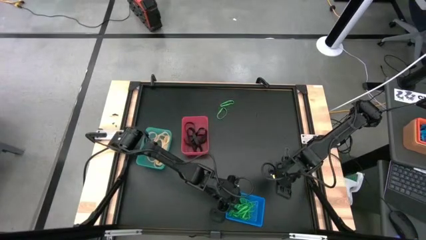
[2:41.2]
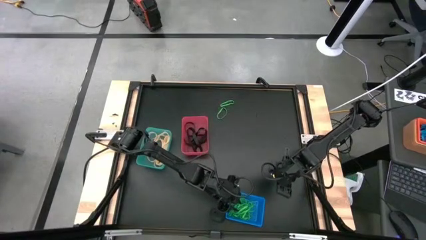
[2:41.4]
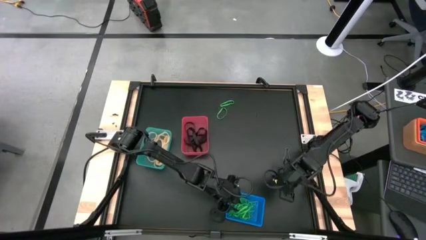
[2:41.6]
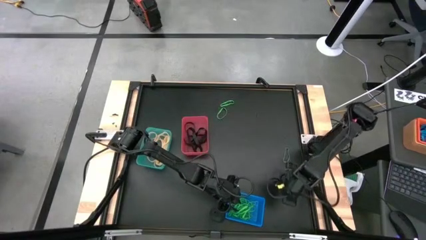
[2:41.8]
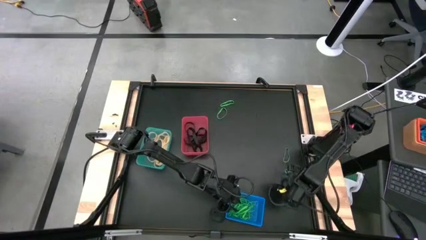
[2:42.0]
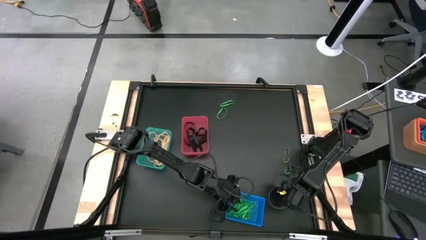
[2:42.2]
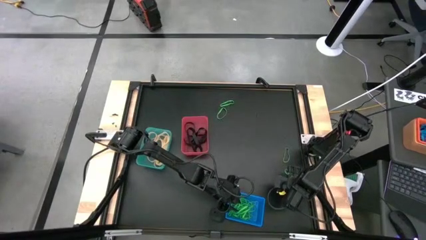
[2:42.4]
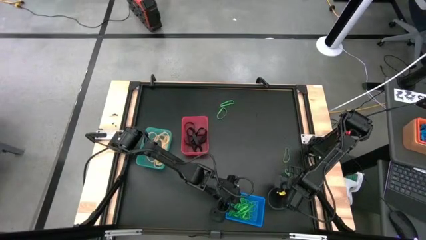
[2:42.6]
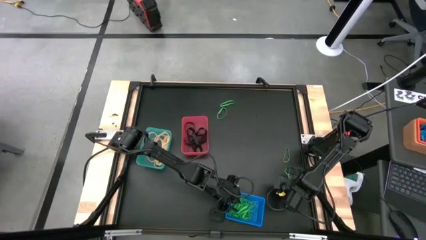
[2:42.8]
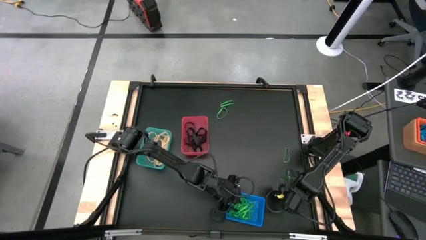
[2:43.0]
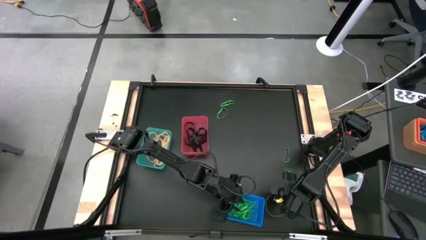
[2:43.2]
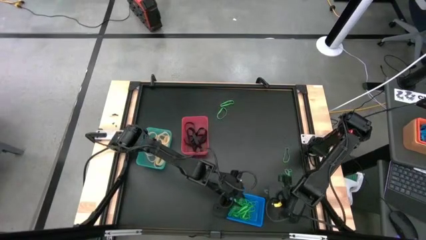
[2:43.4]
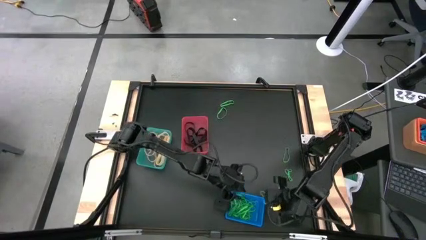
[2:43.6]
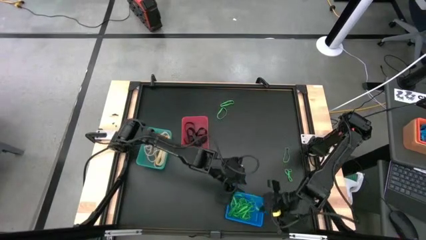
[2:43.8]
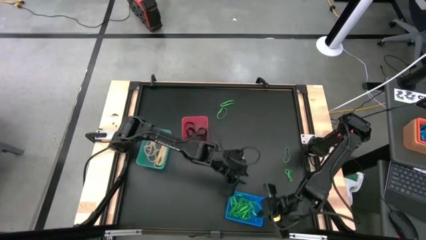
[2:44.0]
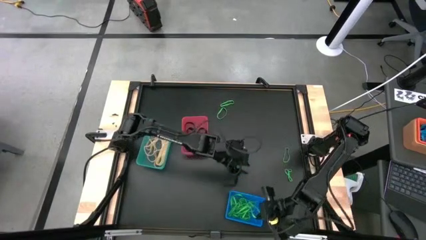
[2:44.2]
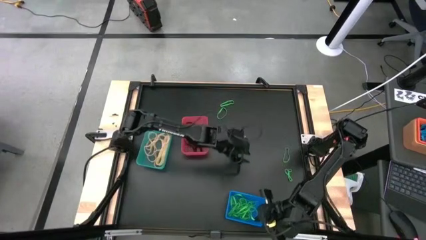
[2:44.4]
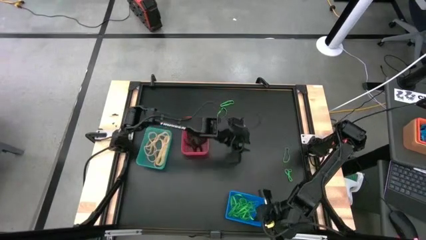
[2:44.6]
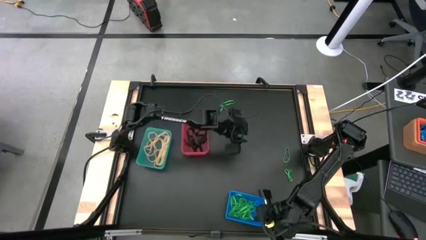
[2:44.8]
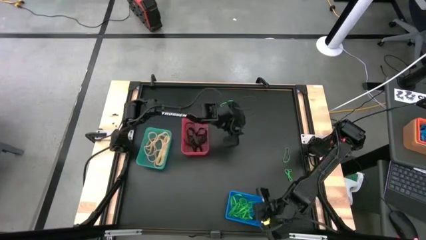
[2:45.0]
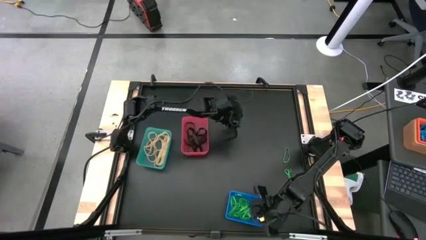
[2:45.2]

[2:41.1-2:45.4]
Task: Sort rubber bands into baskets
Put the green rubber band into the blue bin

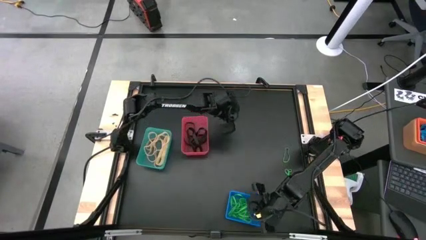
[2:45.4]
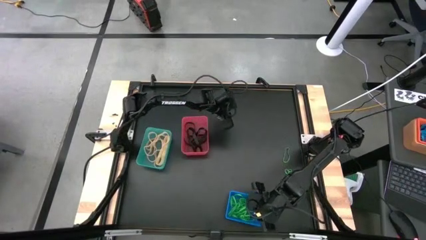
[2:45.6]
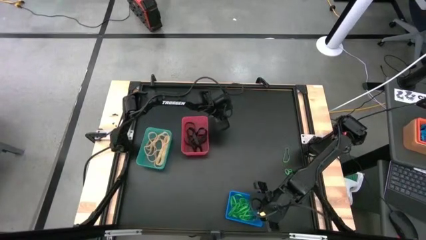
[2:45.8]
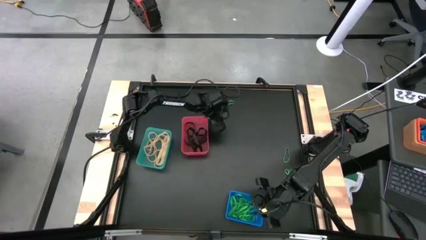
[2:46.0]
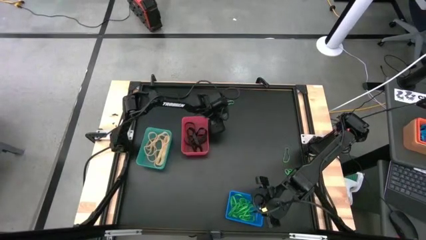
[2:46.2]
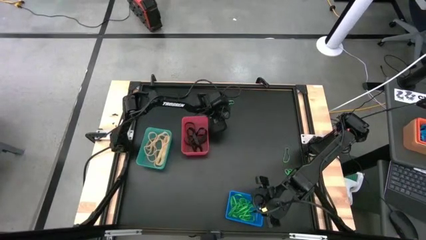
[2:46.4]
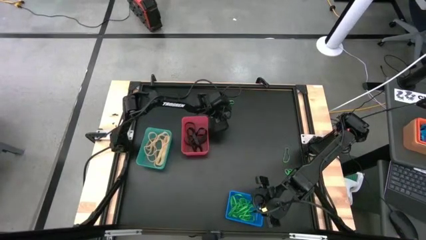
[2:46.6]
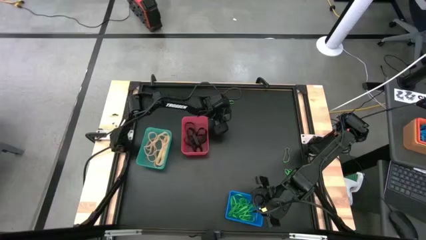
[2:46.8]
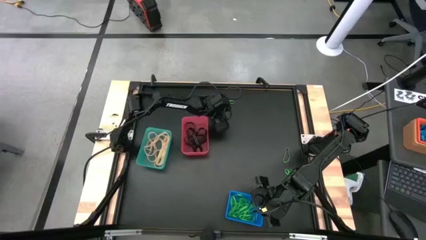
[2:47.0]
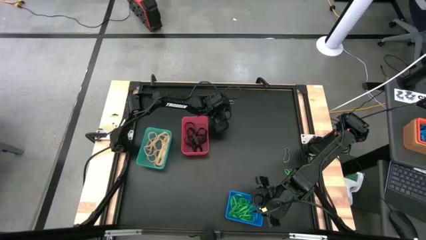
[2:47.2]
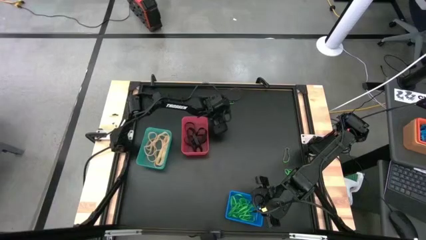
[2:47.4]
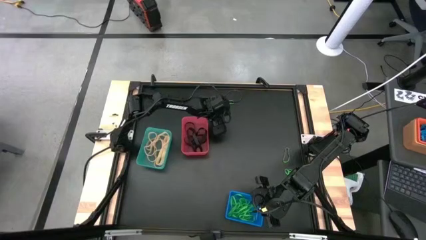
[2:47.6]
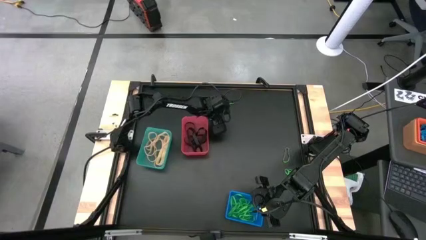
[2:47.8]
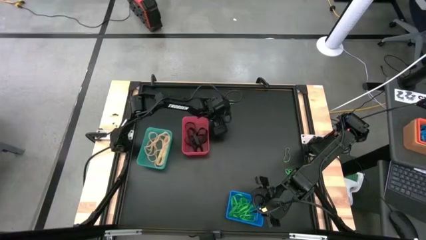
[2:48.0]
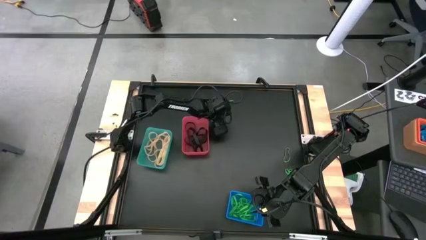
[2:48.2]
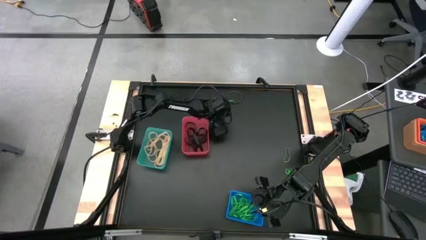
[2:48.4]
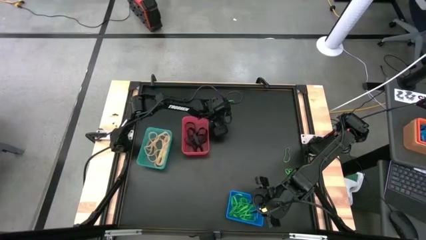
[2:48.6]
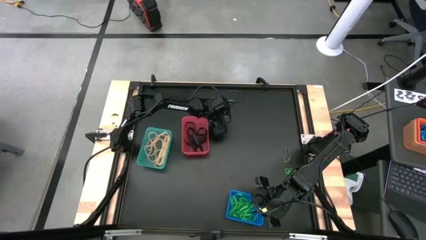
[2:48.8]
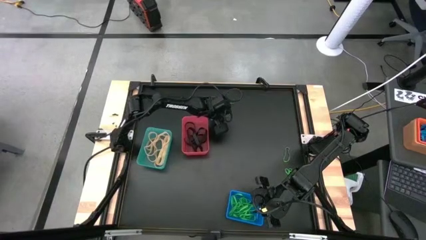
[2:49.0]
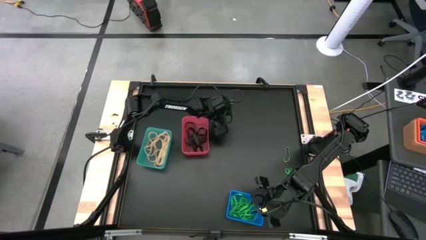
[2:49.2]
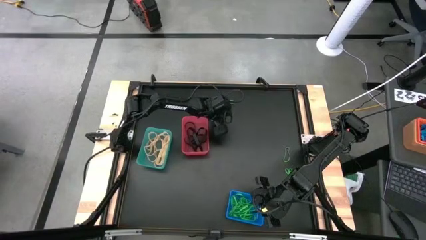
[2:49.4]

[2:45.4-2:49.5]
Put the green rubber band into the blue bin

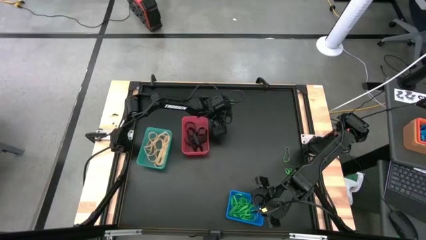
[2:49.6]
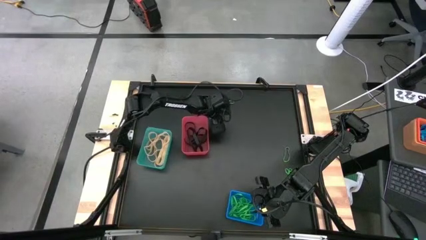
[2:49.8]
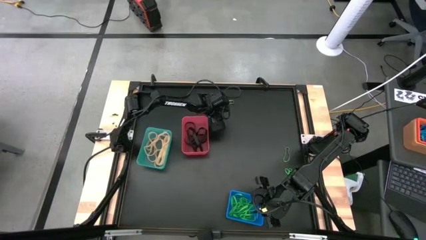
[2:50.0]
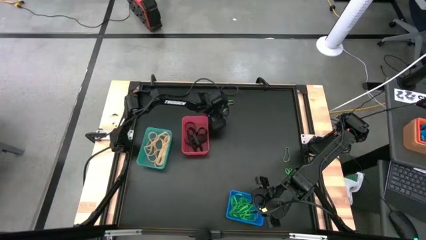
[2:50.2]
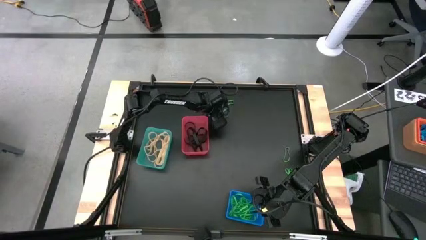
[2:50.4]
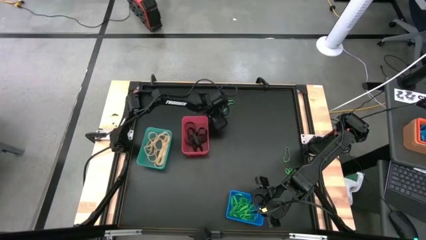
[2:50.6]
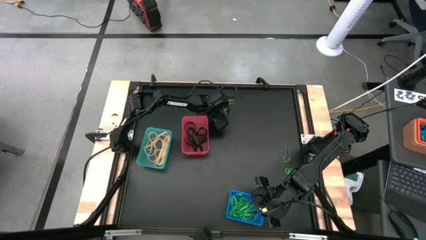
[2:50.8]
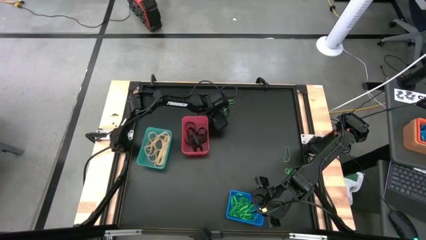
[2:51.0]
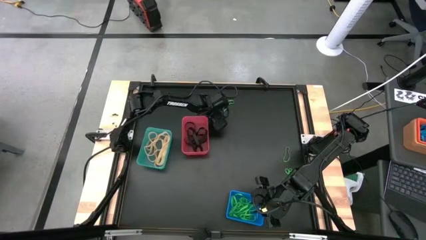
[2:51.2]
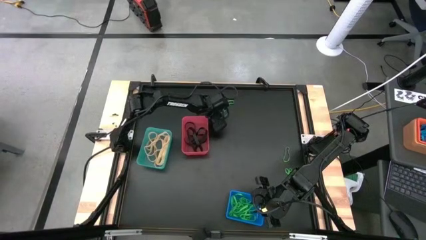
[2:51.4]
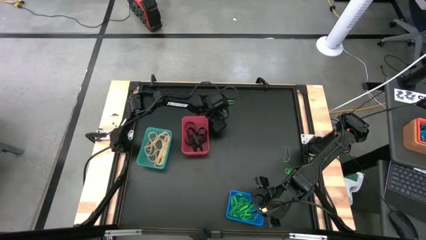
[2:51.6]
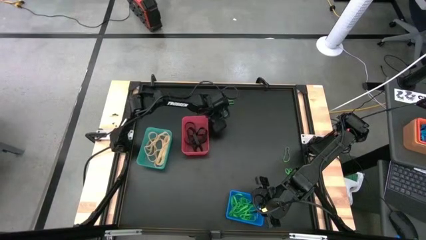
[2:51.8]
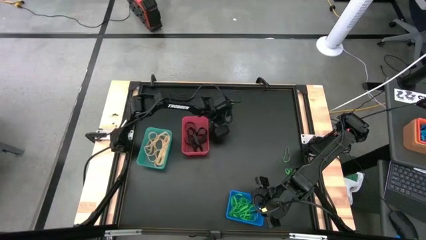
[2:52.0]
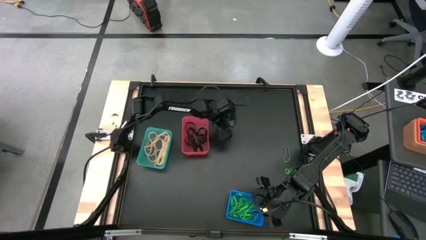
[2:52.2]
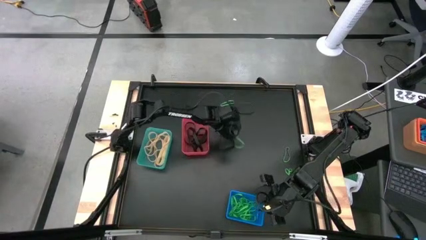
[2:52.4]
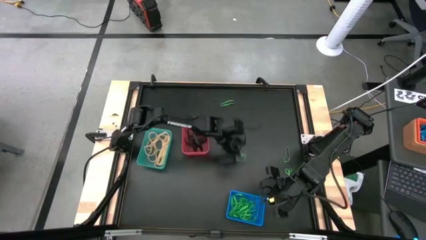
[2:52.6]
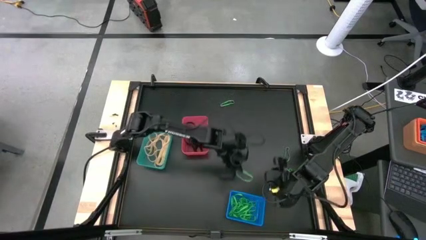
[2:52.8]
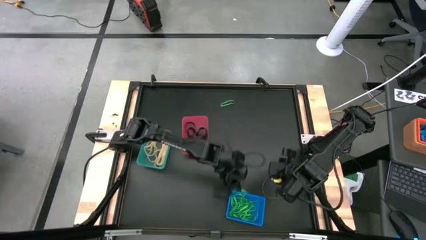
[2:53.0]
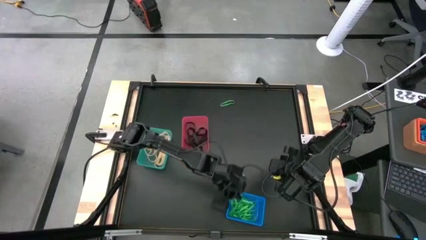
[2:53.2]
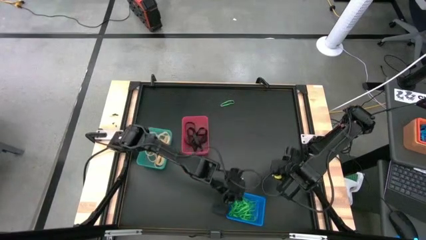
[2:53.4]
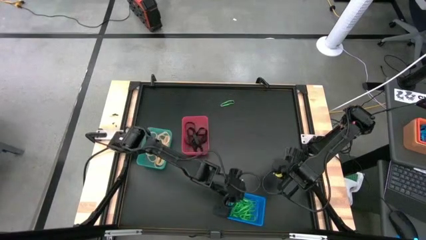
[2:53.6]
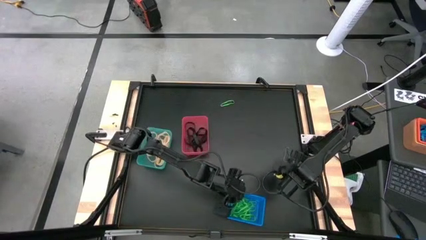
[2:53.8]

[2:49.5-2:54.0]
Put the green rubber band into the blue bin

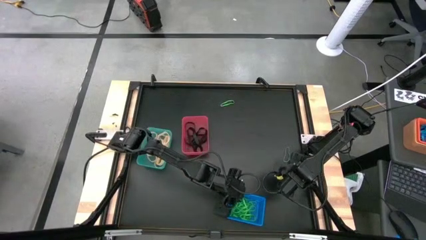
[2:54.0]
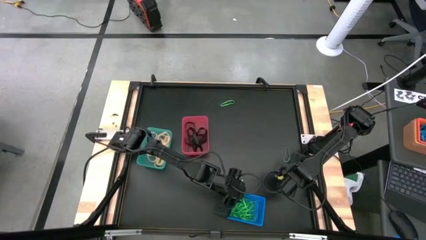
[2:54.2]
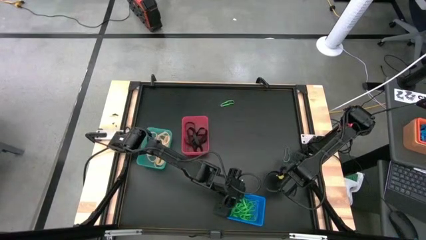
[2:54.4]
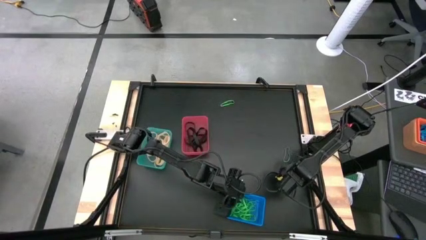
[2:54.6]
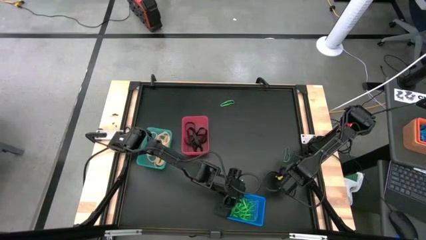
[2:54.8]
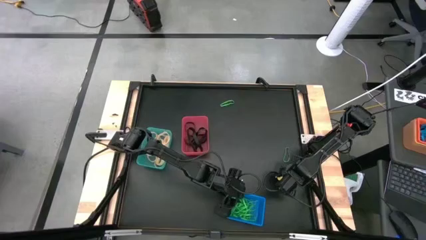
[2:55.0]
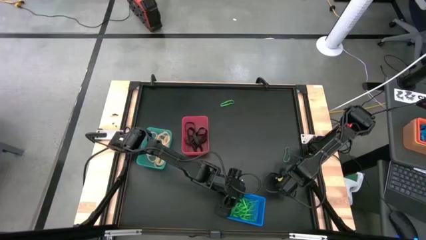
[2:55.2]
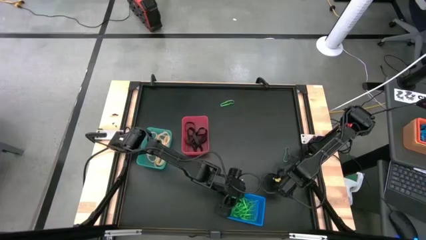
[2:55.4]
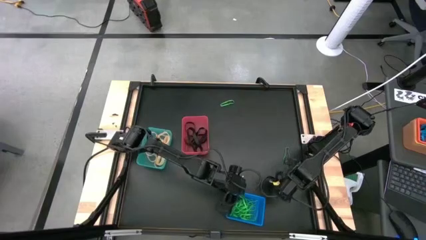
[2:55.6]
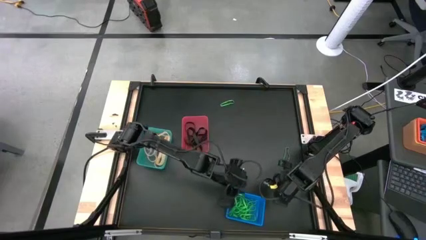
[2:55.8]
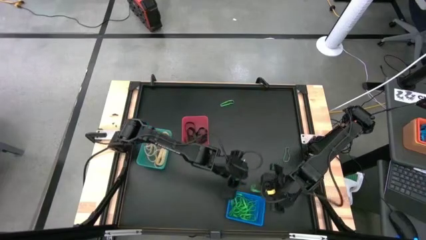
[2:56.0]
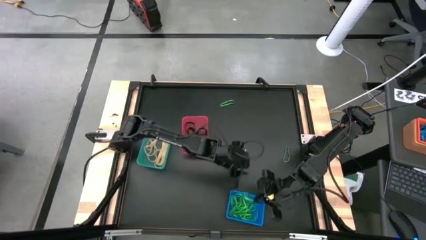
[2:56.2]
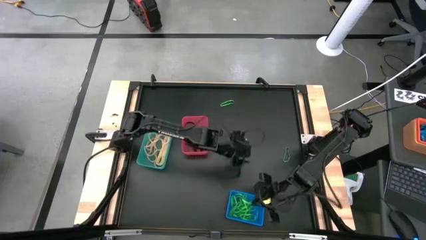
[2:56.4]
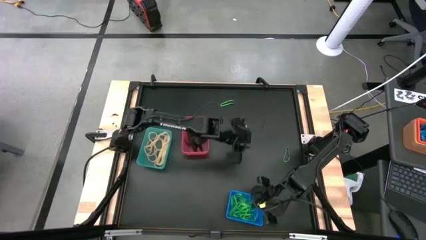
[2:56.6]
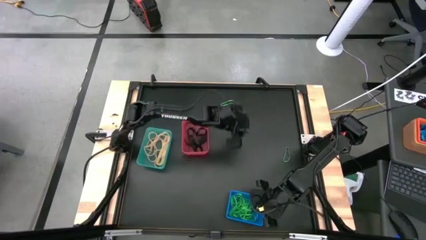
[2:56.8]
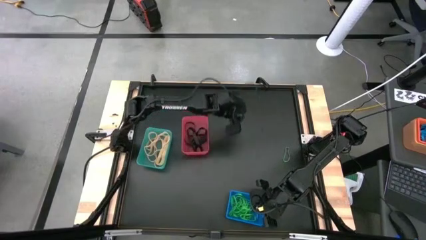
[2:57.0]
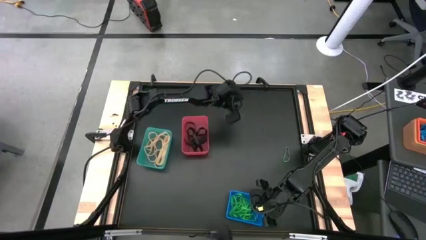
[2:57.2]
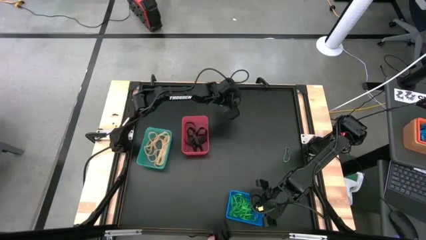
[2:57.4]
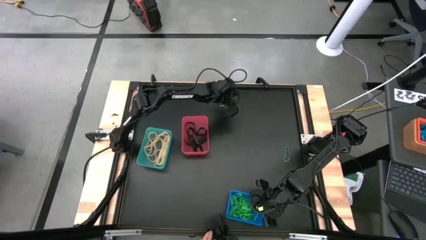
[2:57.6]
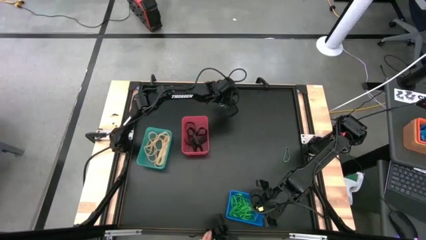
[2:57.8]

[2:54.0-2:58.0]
Put the green rubber band into the blue bin
